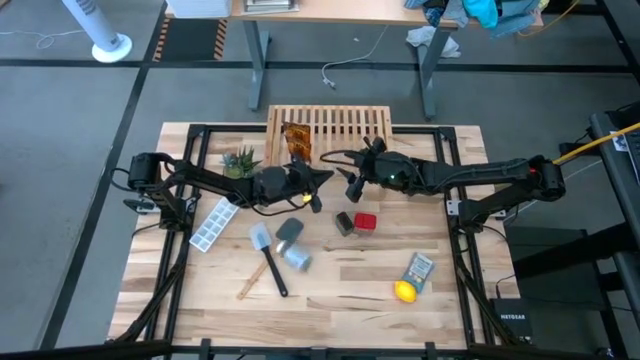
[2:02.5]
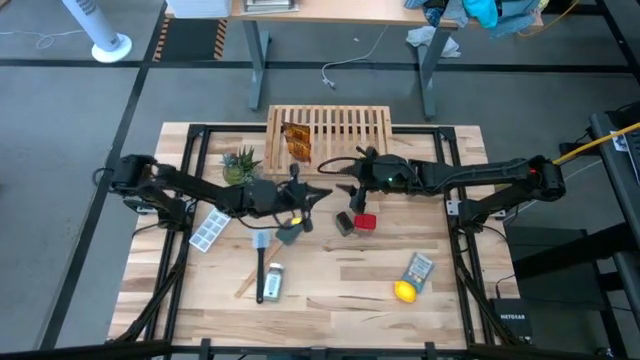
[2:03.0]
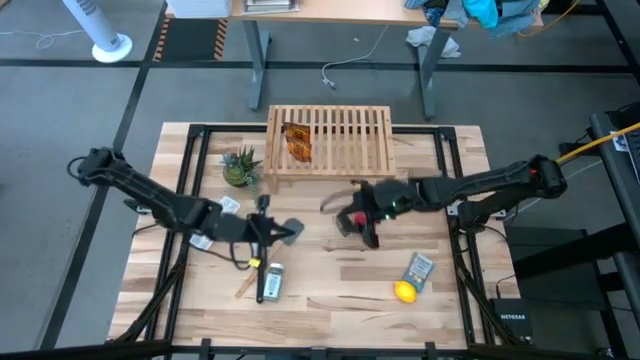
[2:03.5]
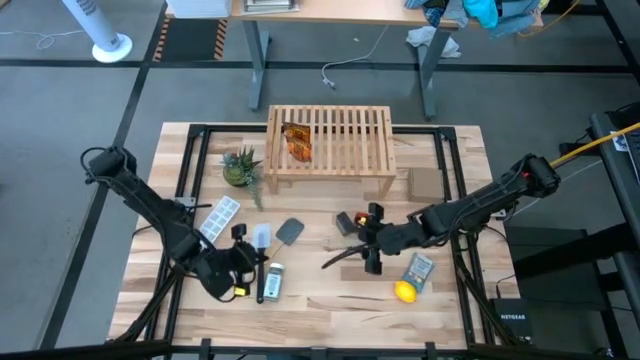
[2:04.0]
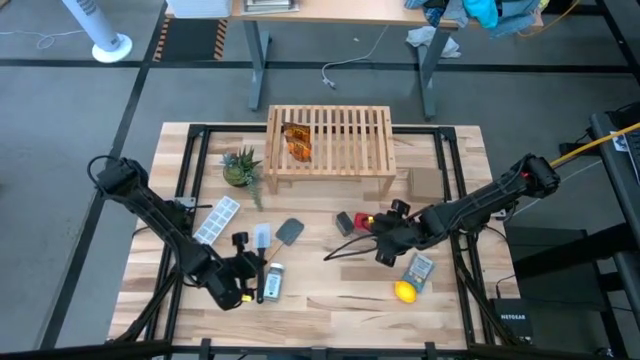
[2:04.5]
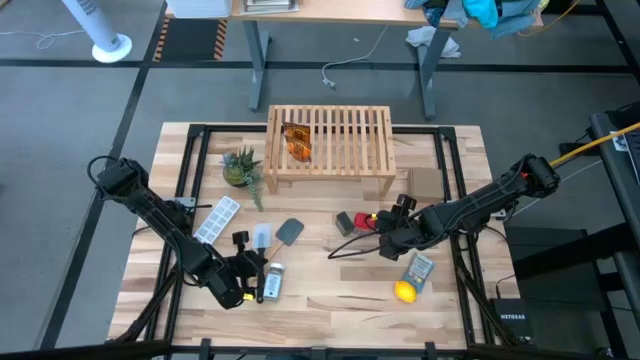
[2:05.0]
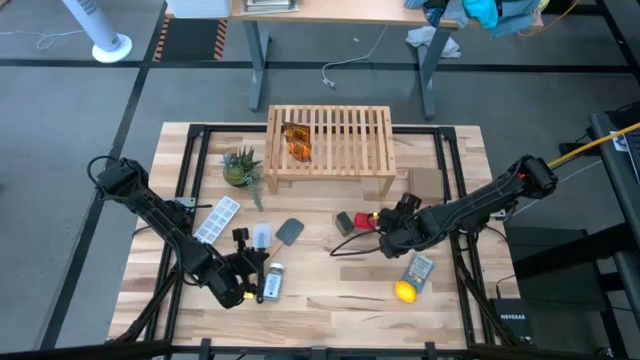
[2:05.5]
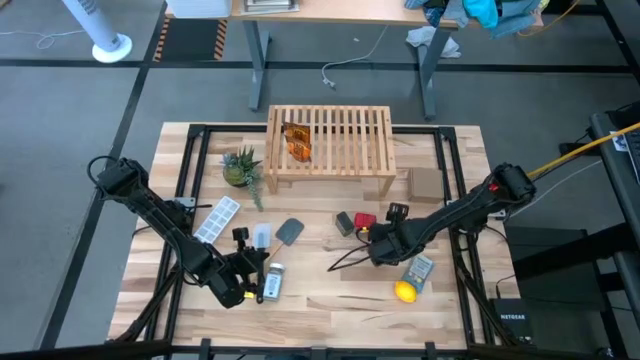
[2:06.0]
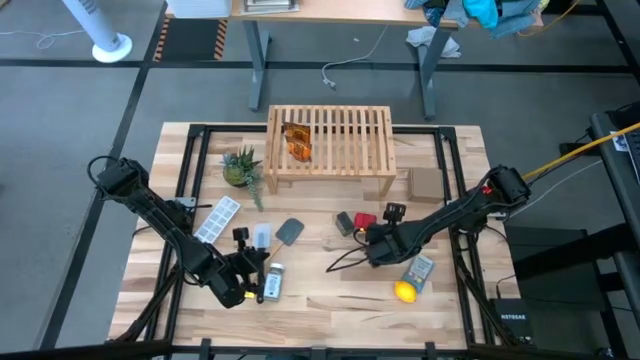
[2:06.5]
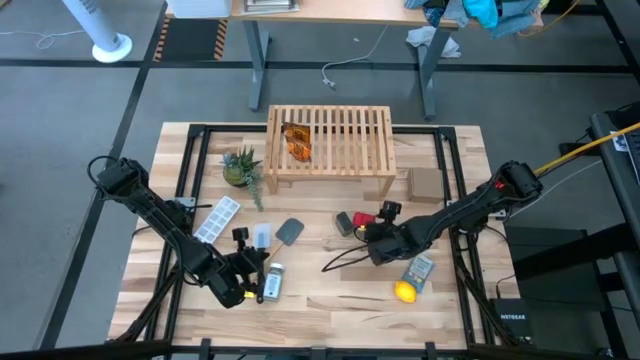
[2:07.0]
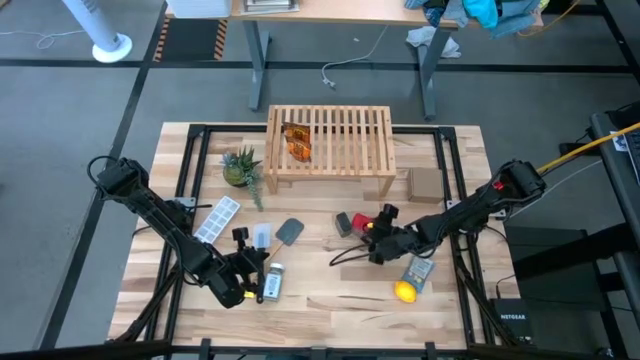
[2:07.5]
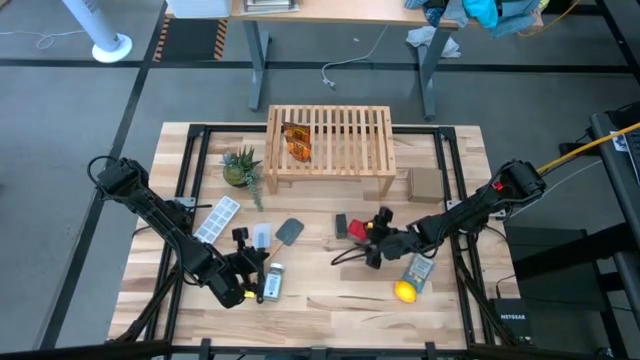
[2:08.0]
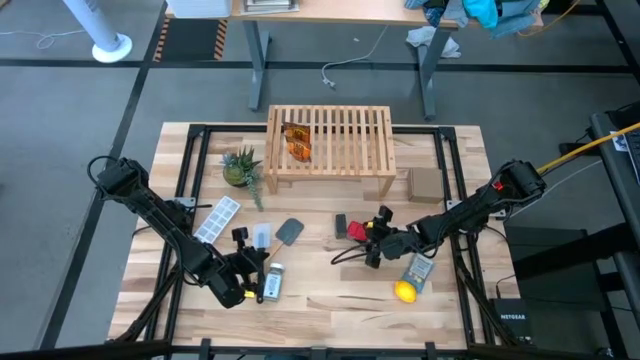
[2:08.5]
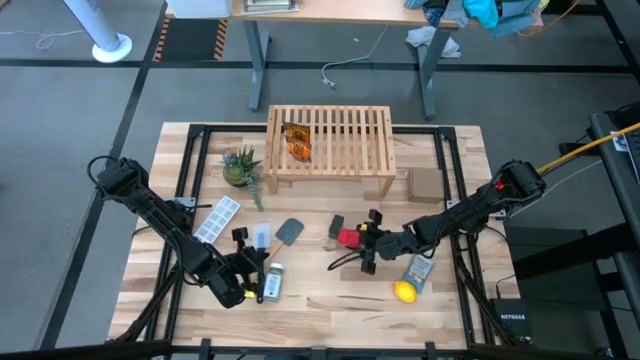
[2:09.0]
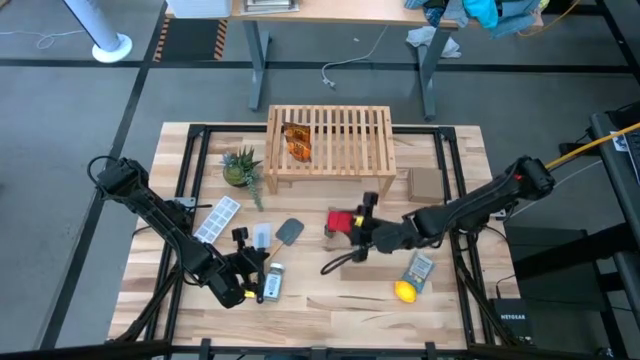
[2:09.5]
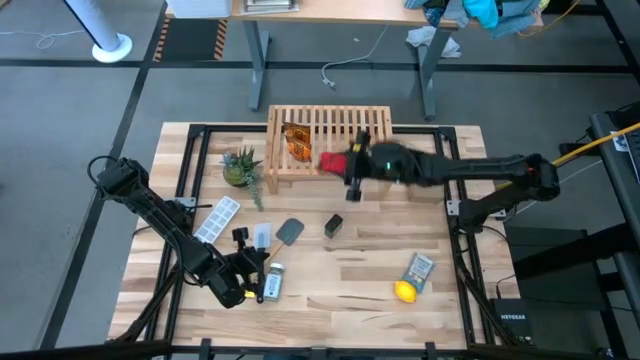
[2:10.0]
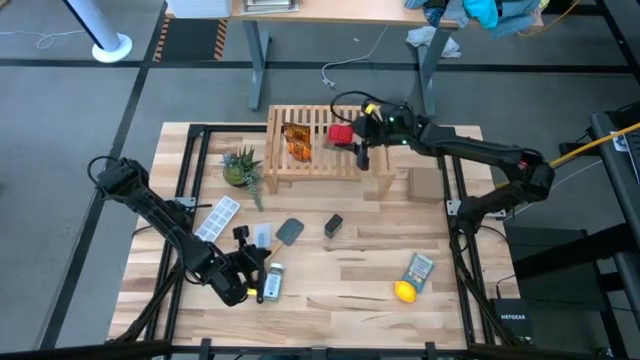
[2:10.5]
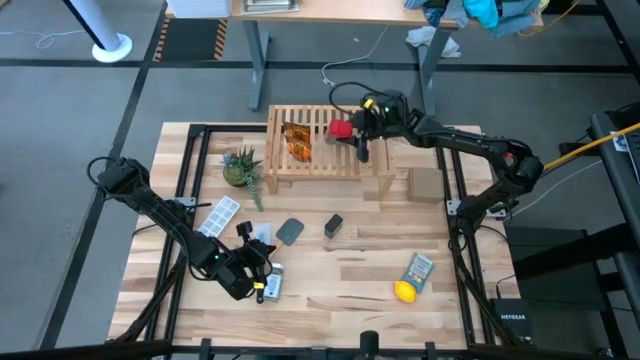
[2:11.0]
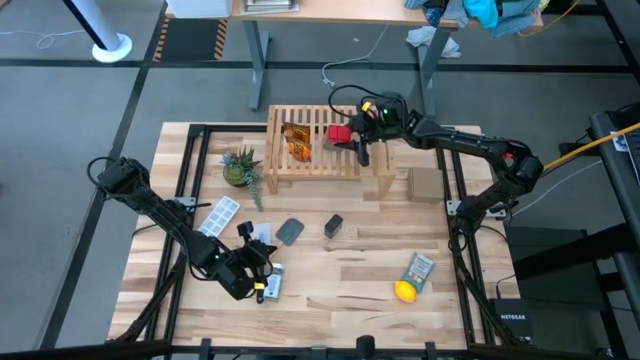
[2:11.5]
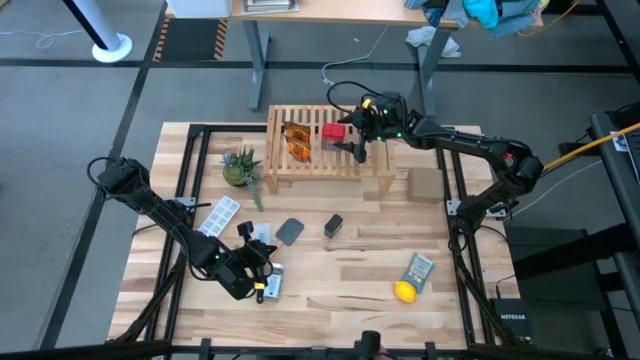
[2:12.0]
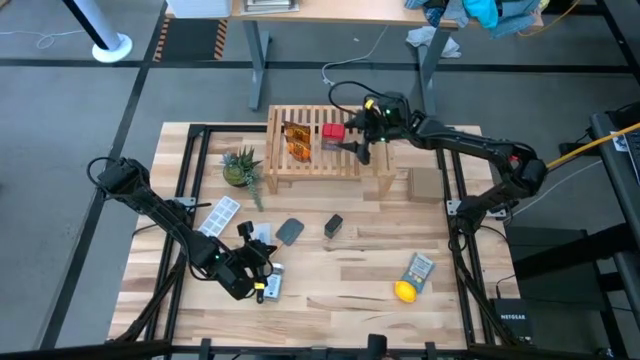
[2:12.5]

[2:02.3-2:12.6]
Task: Shelf spices
Put the red seasoning can on the shelf
